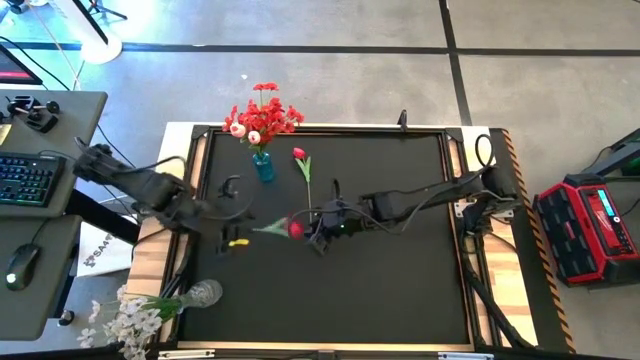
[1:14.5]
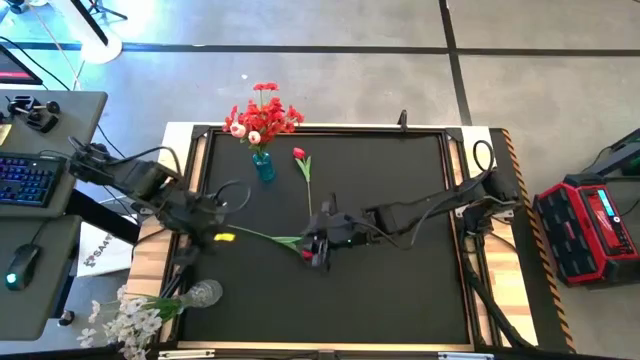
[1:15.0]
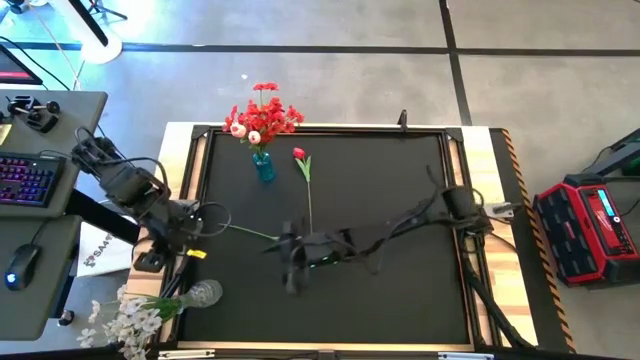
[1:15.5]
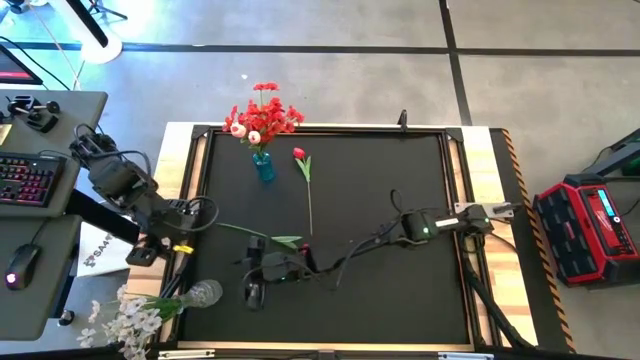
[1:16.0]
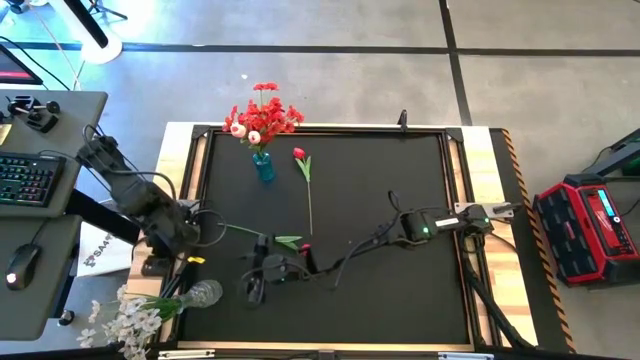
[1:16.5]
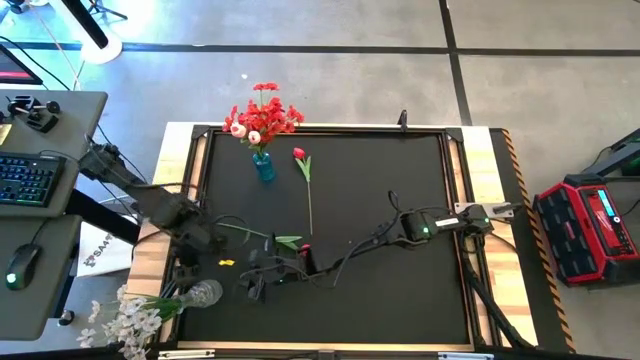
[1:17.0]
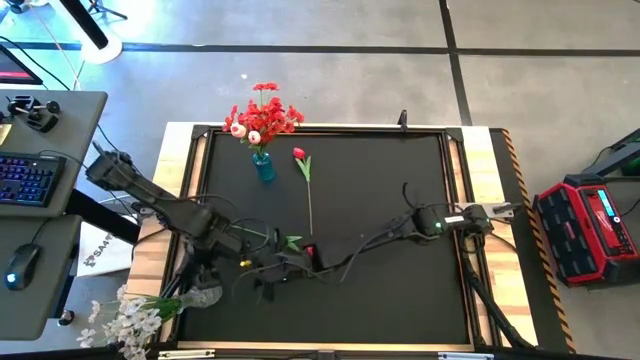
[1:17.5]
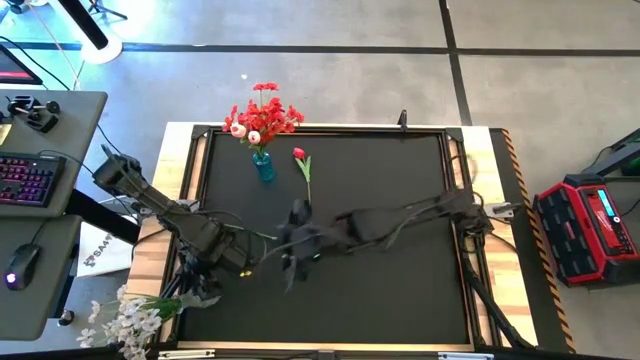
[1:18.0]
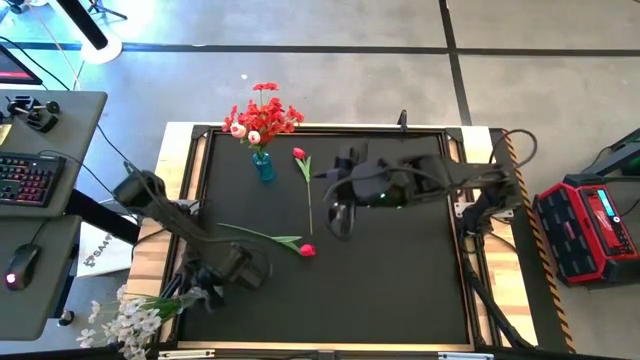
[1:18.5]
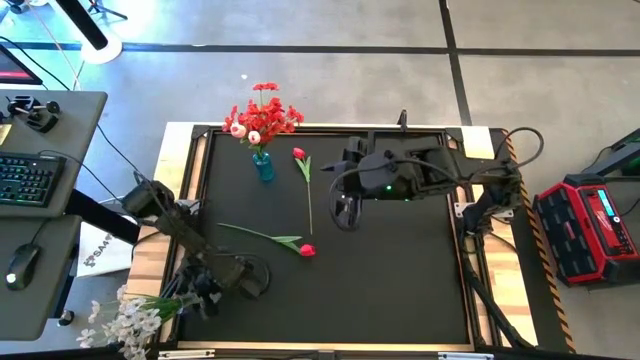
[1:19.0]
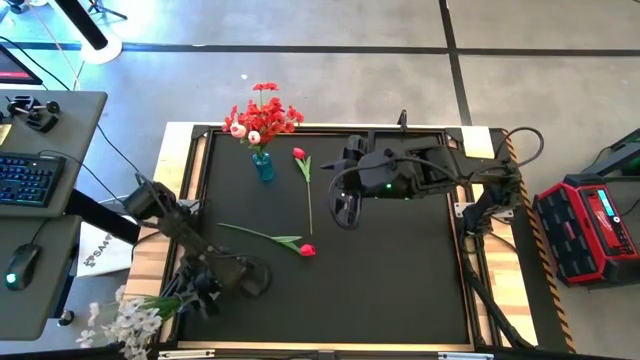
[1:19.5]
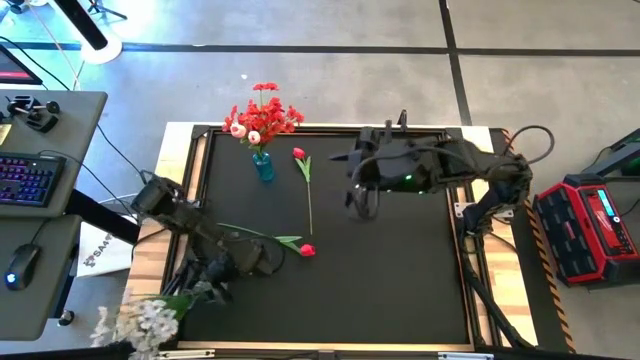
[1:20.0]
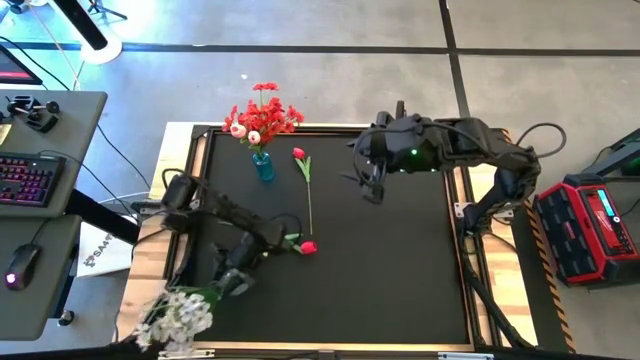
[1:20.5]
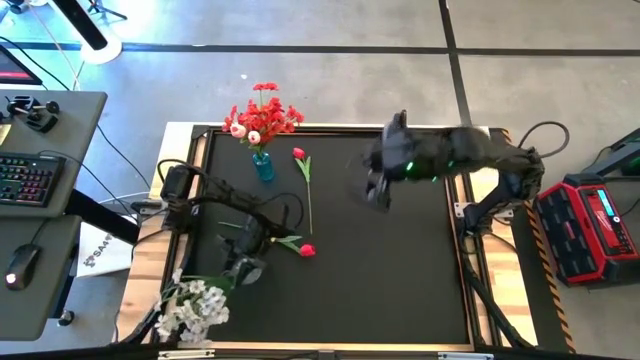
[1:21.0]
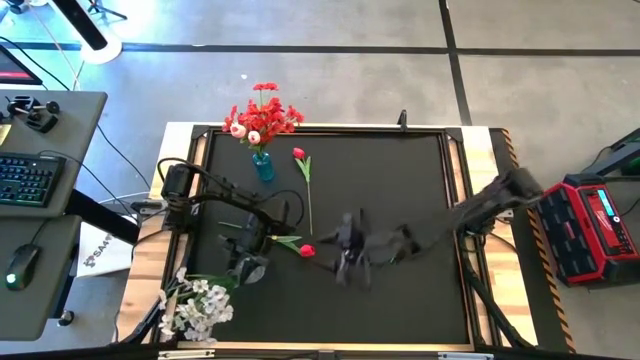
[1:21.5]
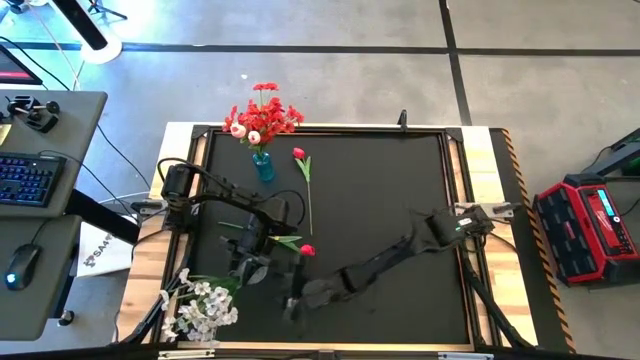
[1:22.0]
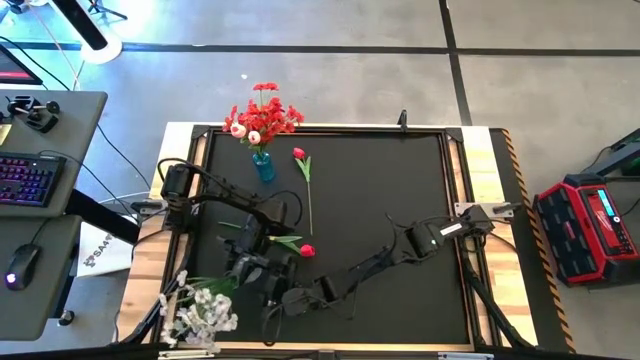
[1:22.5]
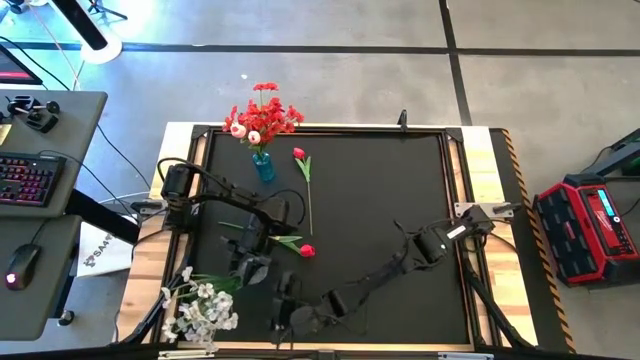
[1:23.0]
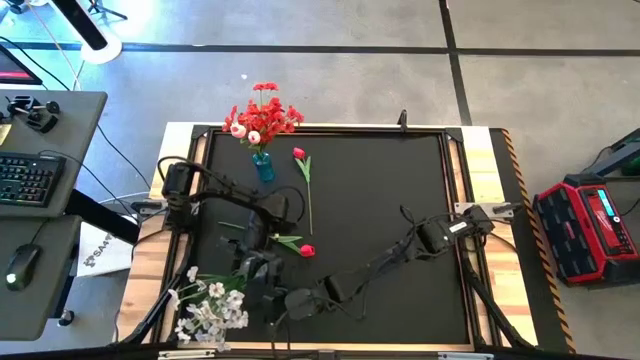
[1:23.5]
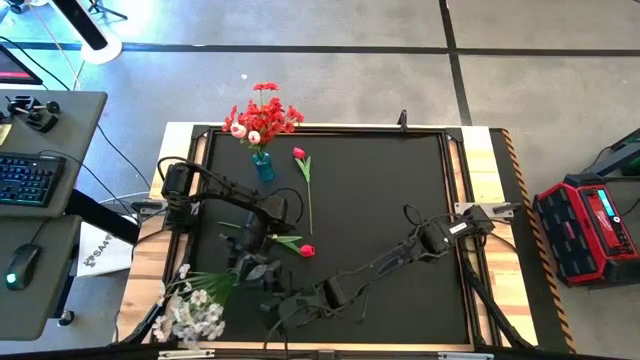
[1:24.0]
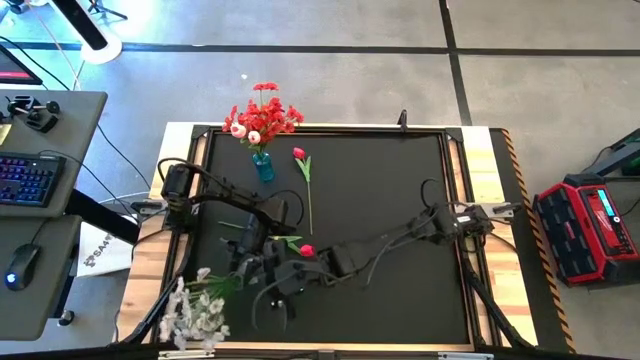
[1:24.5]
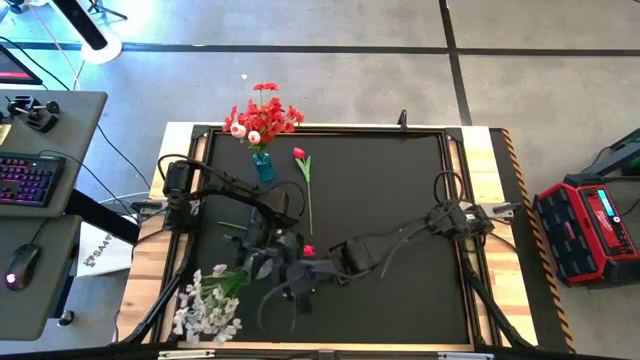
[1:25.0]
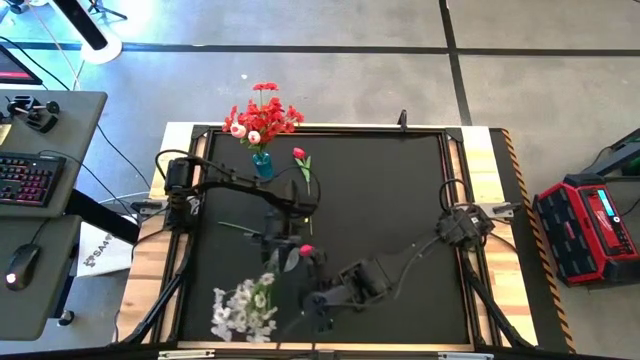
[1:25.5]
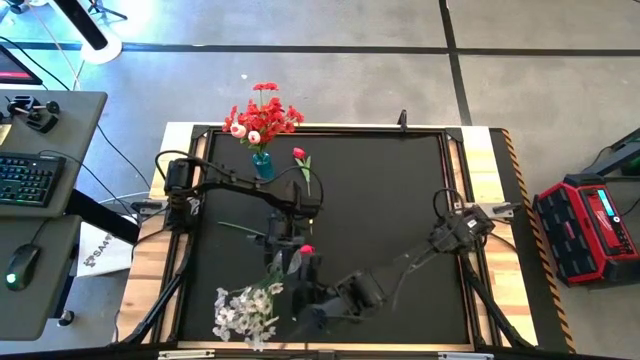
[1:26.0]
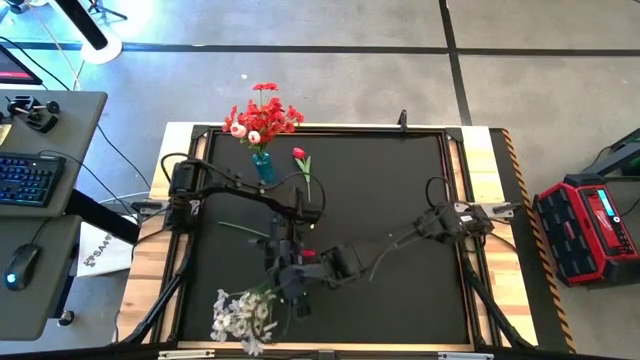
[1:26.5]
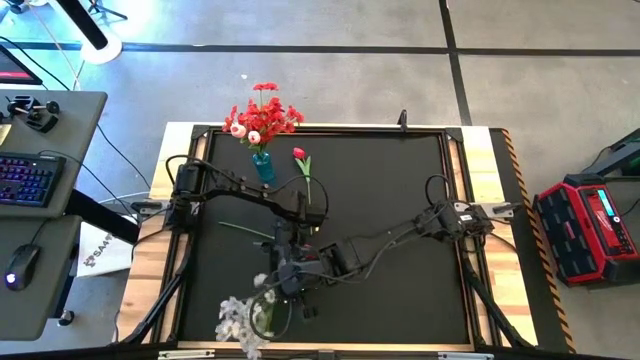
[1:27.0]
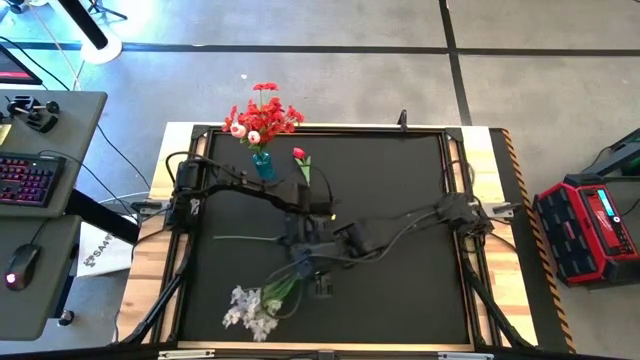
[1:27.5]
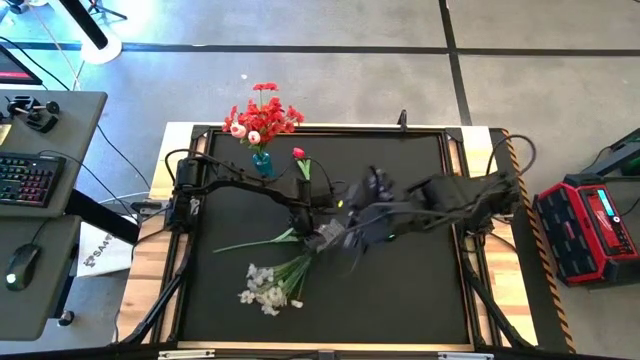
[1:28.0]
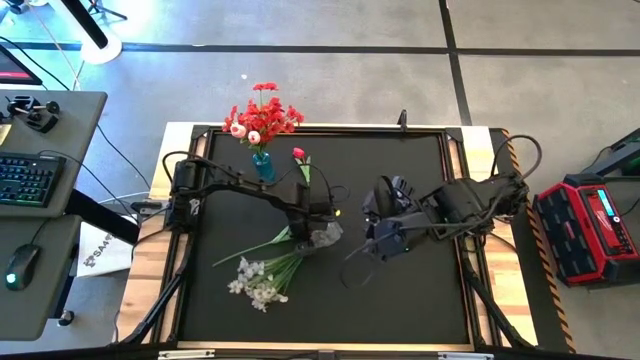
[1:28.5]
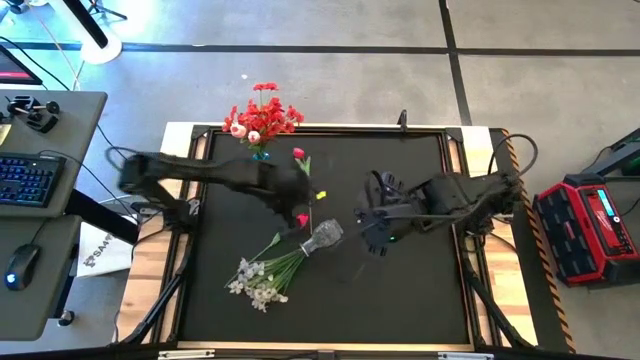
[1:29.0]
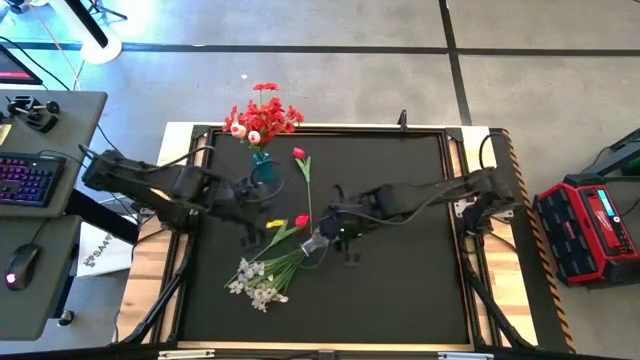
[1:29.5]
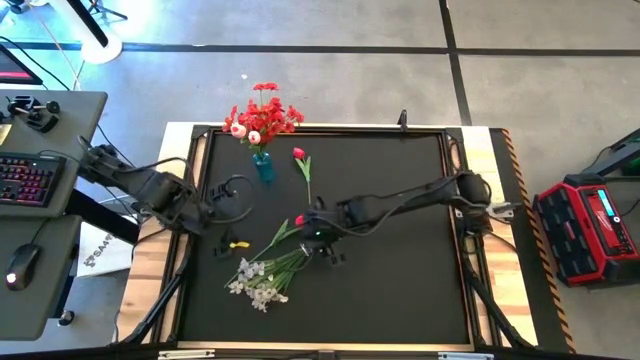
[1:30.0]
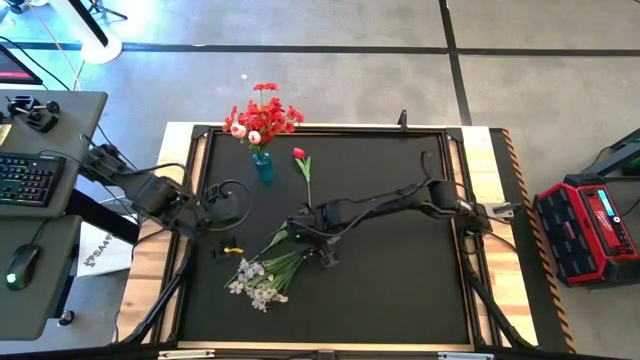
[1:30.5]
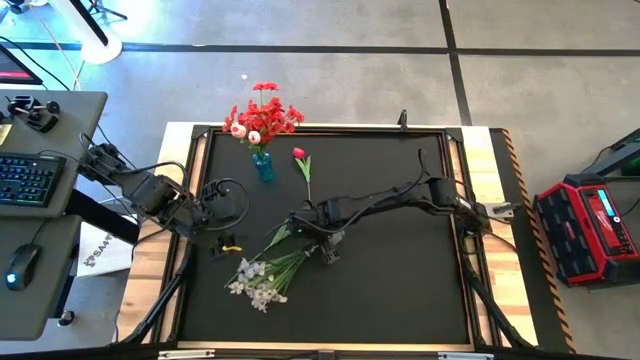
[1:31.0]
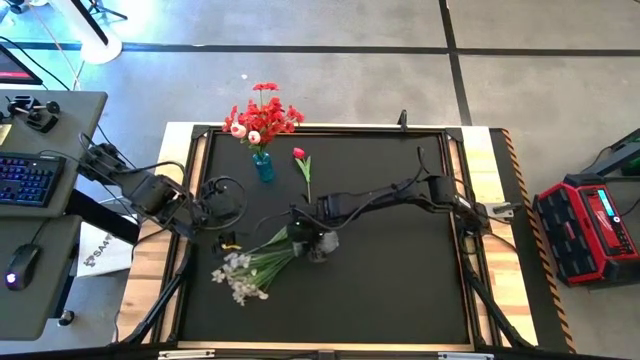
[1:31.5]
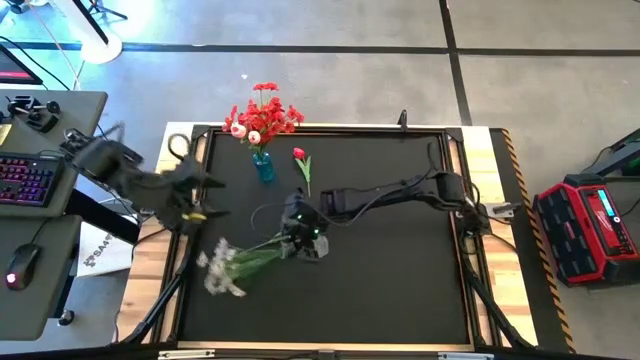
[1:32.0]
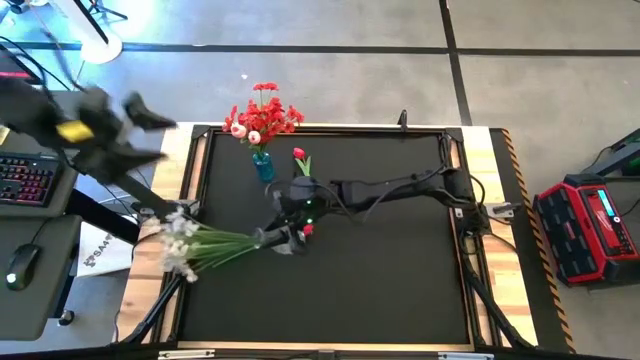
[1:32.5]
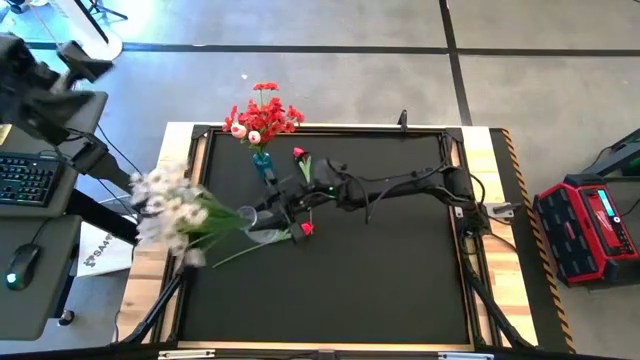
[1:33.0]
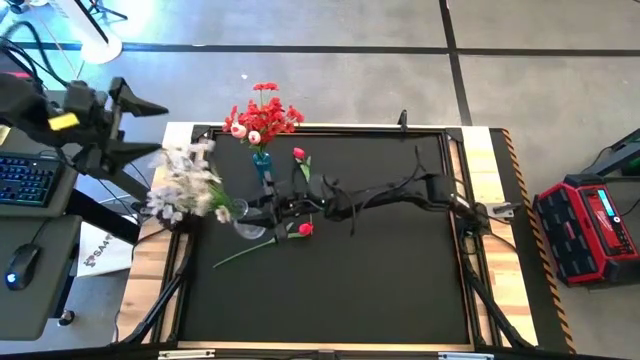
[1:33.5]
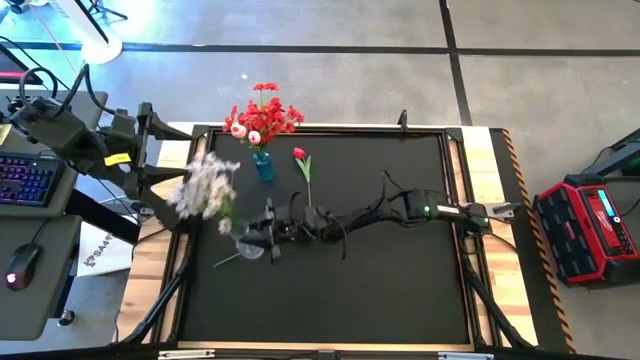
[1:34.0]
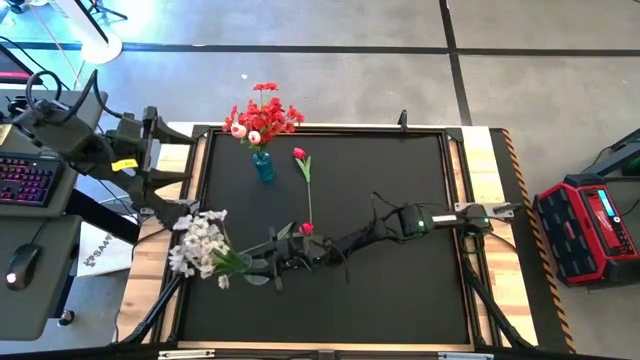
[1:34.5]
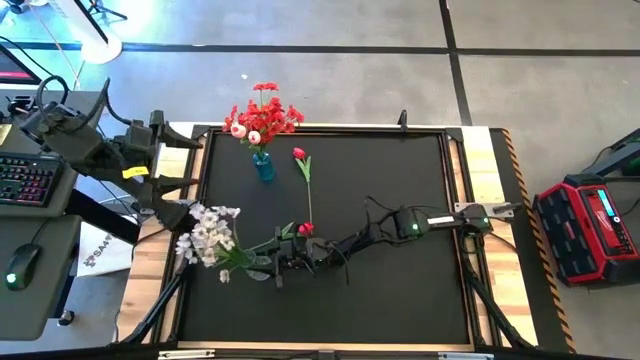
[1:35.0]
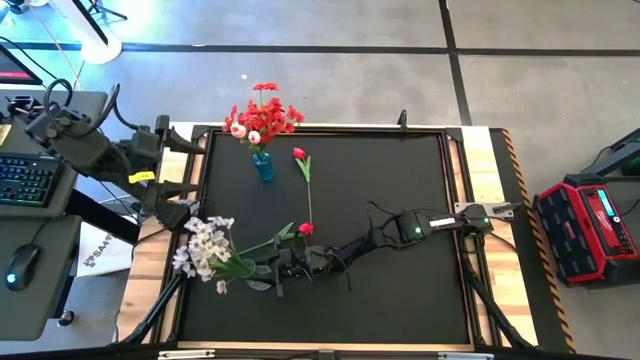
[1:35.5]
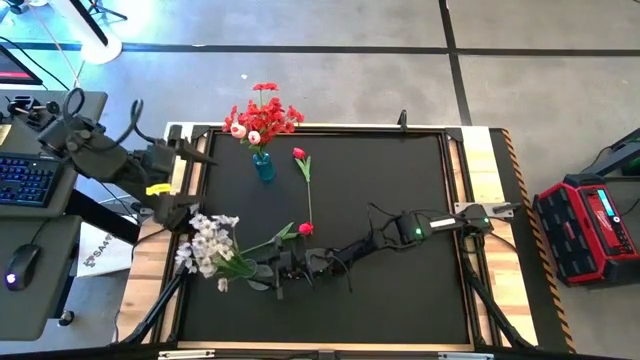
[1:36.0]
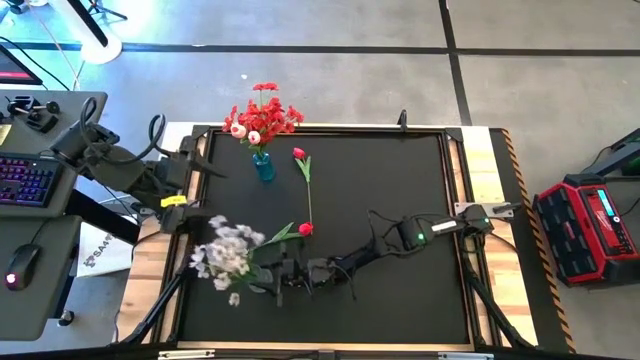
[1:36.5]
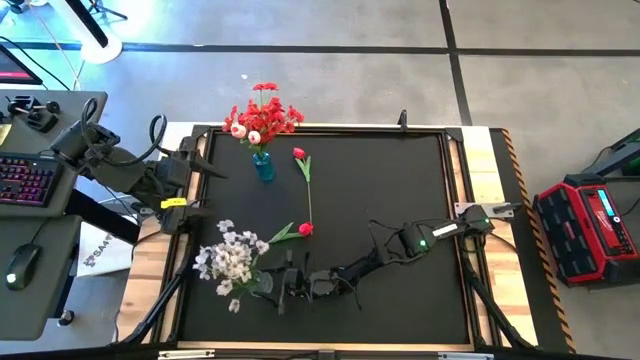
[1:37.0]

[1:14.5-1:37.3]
Task: Sort flowers into vase by color
Adjust the transparent vase
